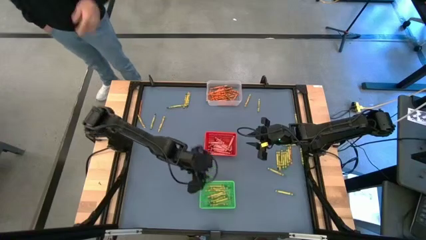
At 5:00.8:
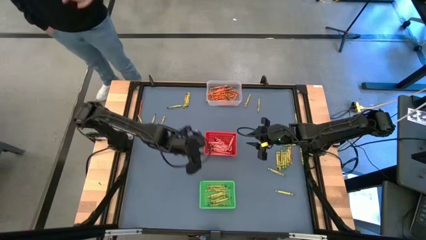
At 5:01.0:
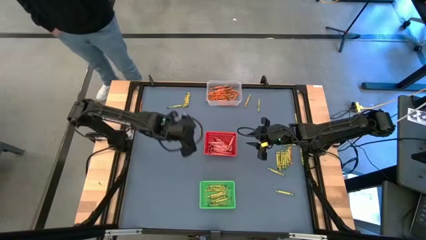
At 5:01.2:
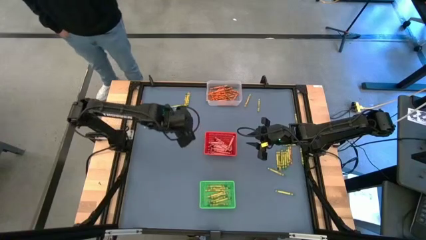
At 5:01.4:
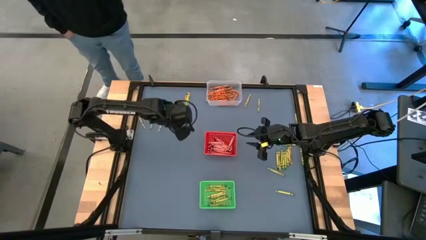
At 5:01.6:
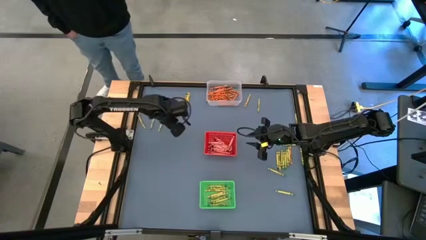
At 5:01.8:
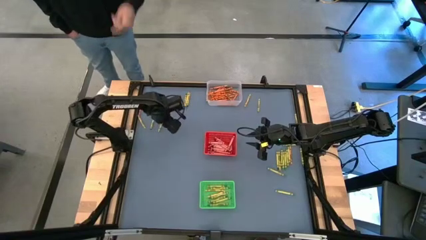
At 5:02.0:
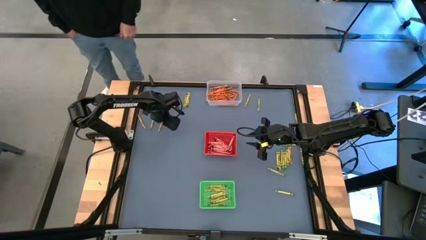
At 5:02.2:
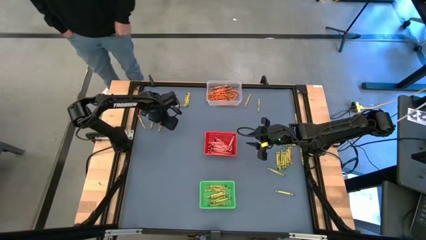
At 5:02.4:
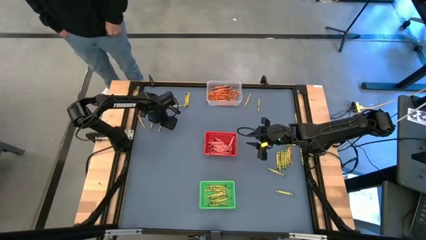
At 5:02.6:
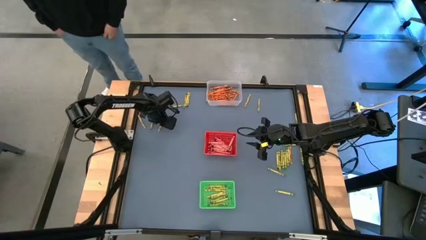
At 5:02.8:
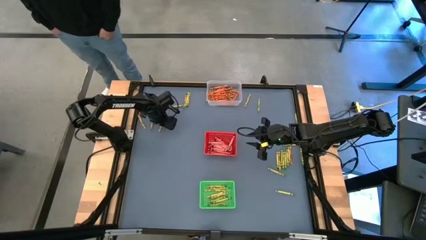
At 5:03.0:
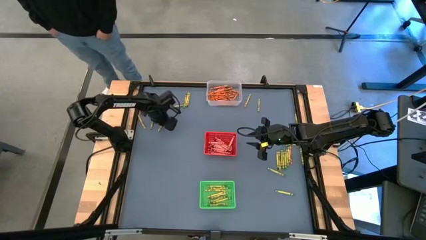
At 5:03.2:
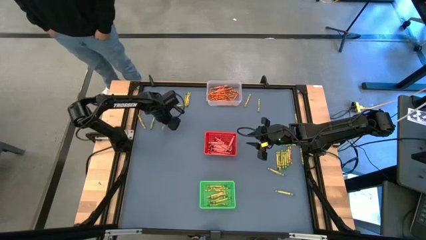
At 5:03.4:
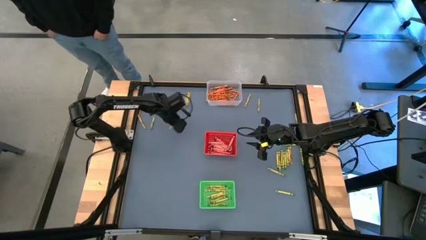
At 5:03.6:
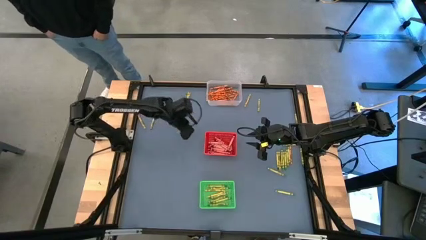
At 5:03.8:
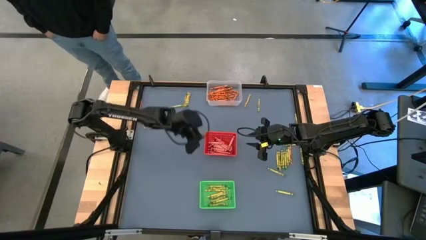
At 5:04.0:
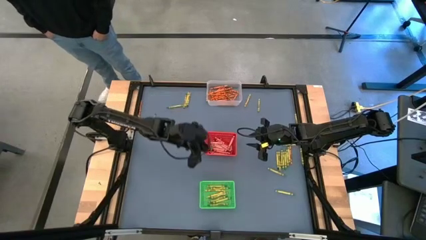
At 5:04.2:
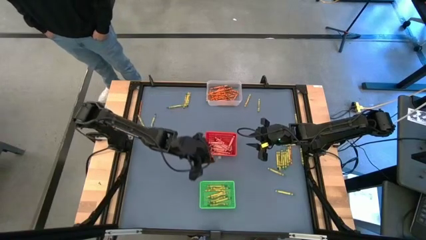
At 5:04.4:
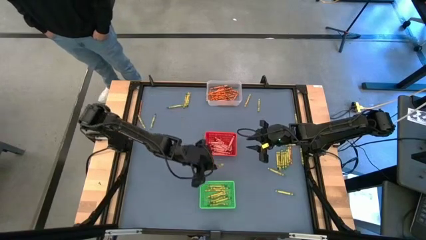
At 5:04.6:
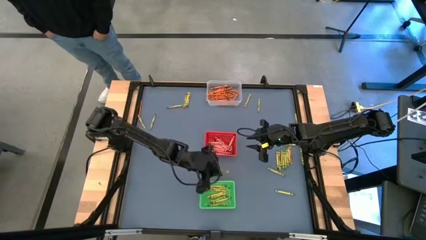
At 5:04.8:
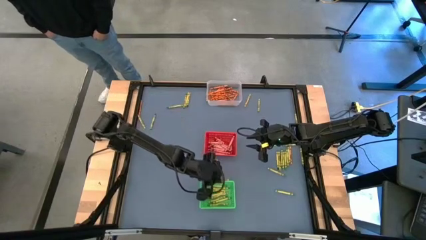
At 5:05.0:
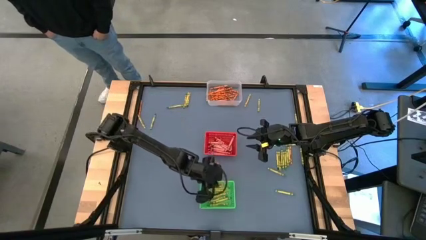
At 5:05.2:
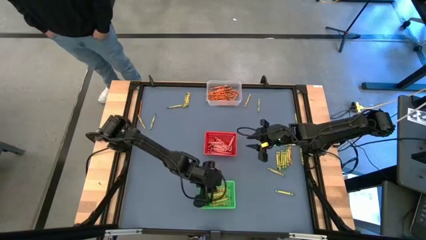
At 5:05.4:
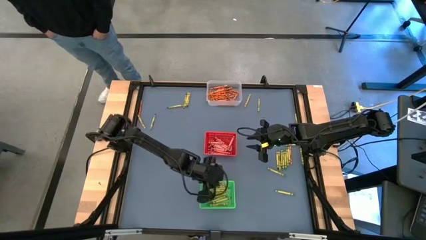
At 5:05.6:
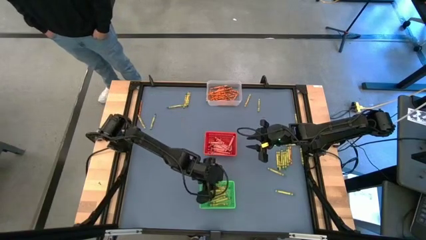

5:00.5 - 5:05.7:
Task: Sort crayons
Put the yellow crayon into the green bin

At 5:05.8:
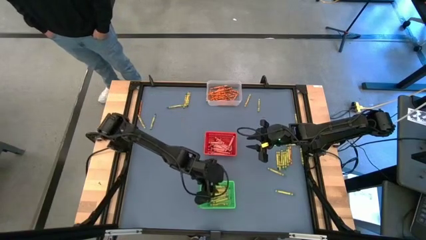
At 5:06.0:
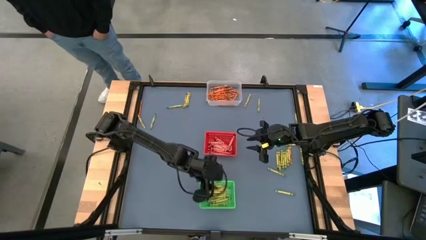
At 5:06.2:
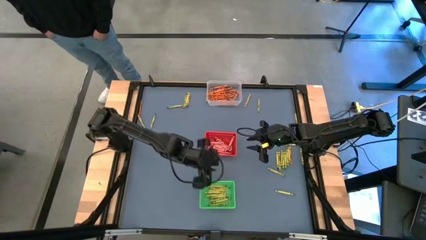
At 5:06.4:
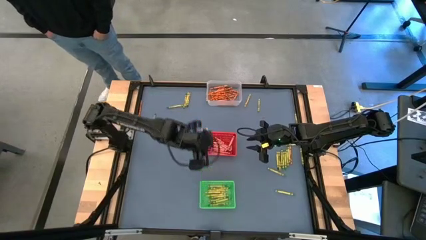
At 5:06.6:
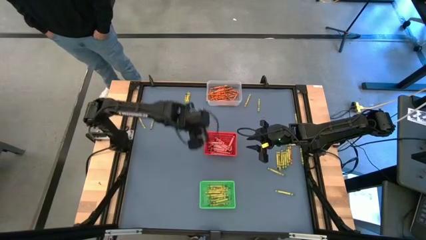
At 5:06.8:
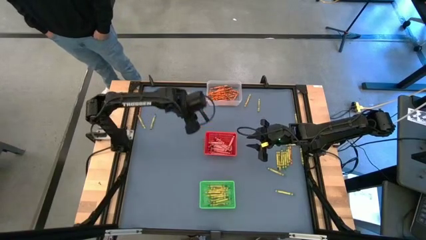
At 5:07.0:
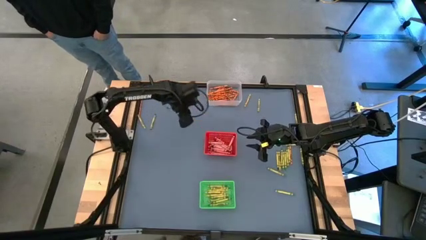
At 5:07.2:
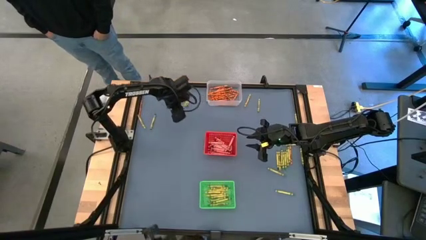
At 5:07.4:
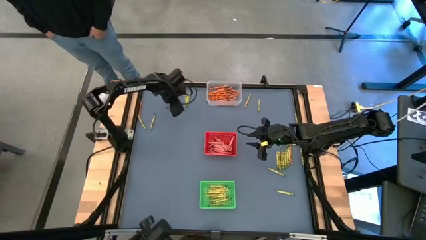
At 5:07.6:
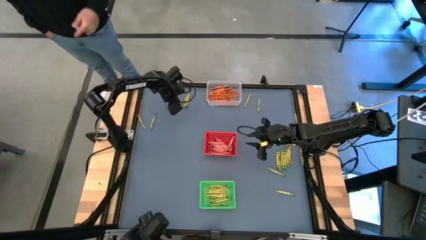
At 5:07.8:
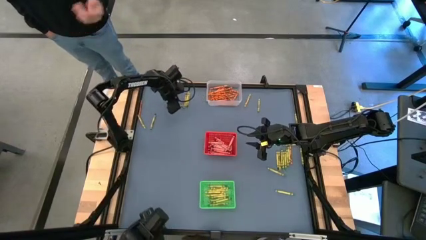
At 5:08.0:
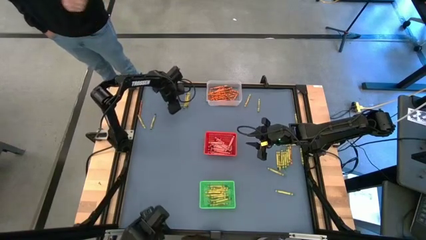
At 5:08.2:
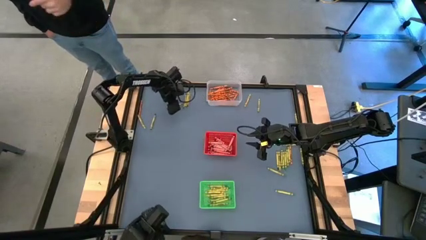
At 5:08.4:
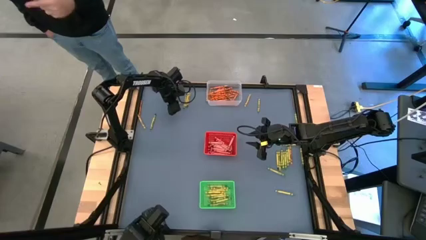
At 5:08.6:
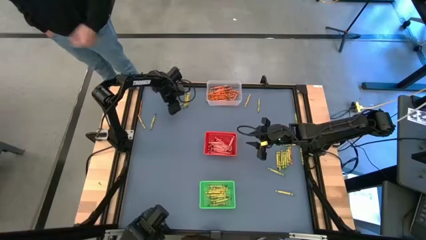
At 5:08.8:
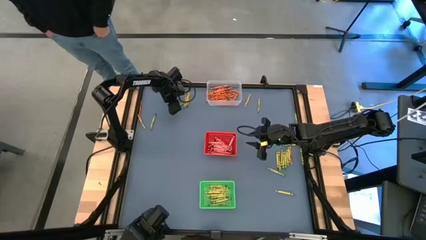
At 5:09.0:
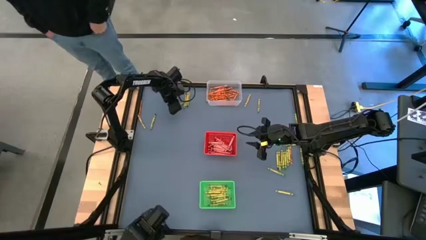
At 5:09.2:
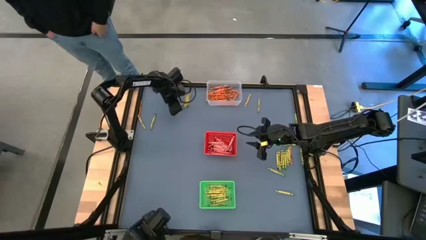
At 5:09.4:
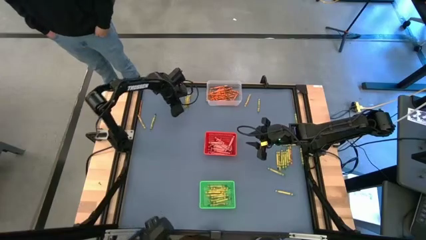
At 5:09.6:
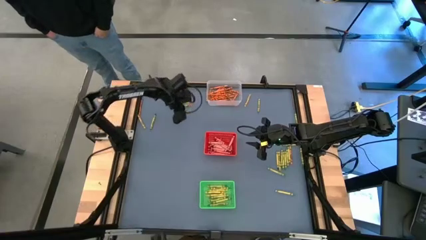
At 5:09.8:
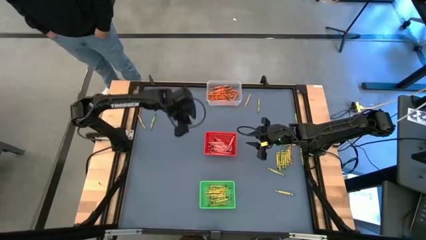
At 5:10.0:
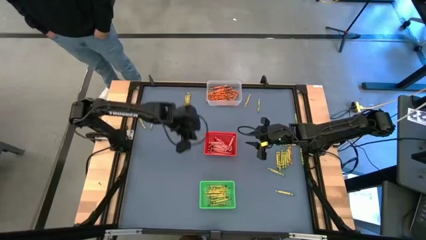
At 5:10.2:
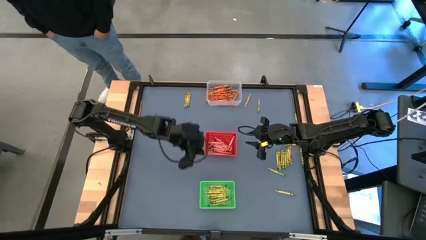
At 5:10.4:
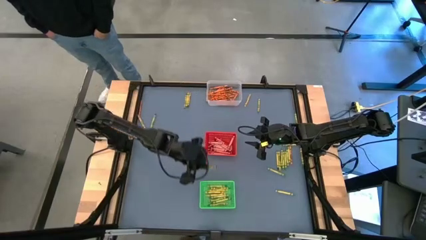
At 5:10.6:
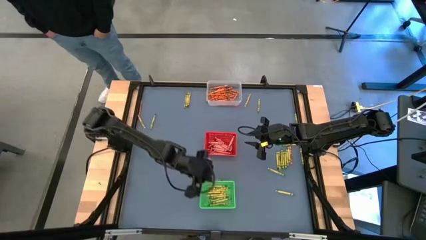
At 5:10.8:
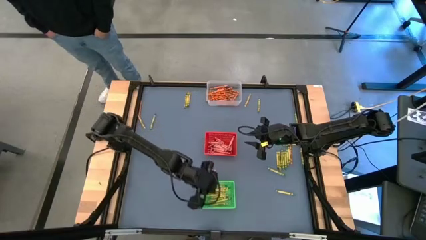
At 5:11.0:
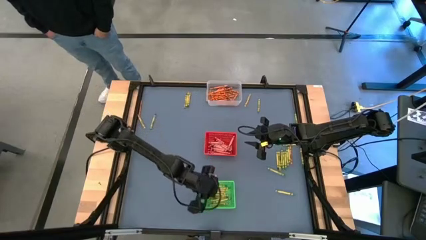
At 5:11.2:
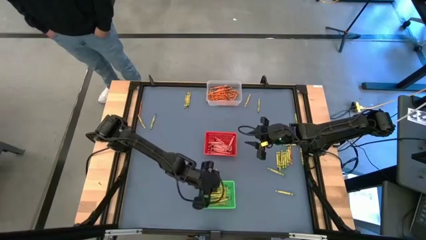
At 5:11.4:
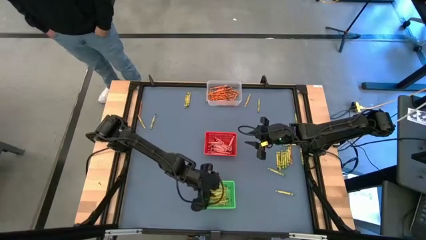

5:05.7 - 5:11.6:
Put the green crayon into the green bin

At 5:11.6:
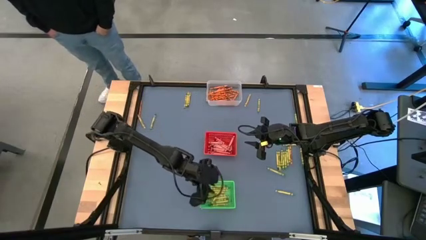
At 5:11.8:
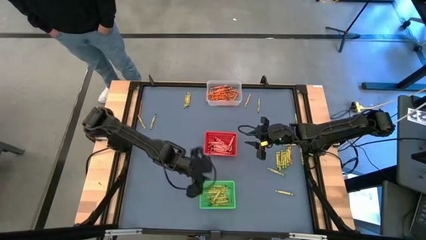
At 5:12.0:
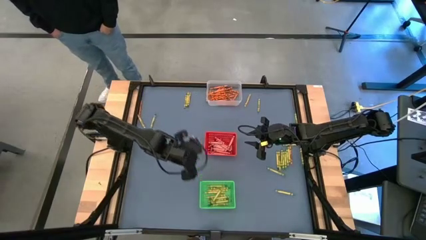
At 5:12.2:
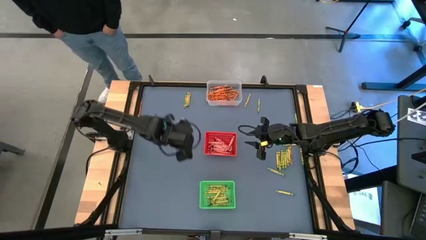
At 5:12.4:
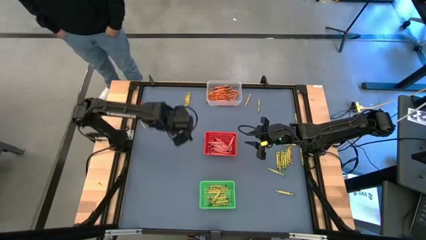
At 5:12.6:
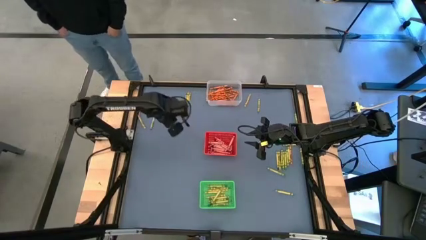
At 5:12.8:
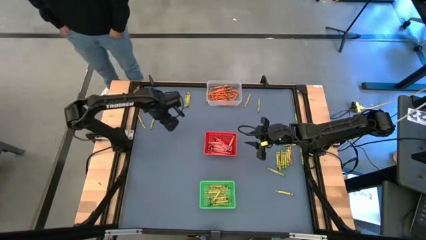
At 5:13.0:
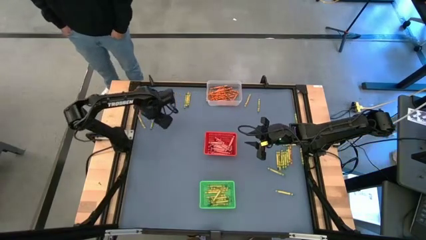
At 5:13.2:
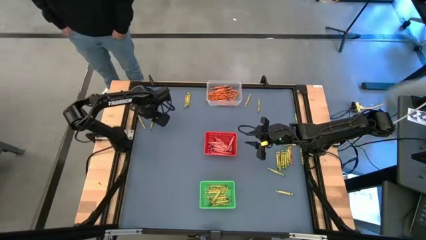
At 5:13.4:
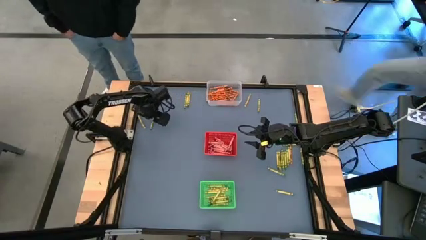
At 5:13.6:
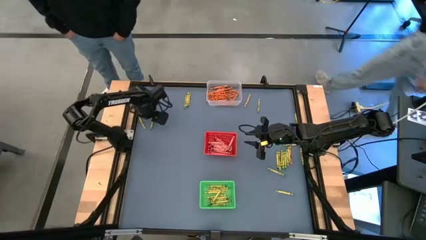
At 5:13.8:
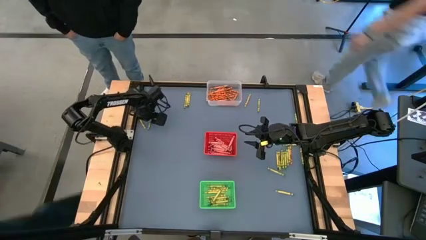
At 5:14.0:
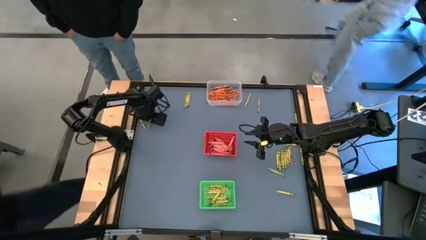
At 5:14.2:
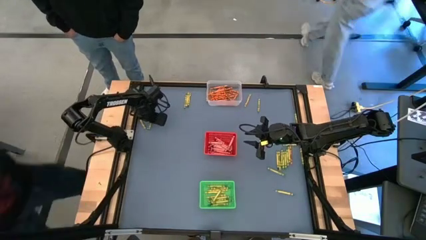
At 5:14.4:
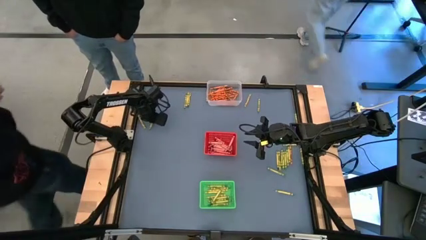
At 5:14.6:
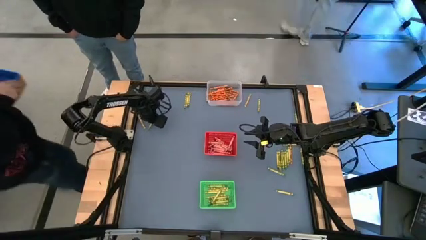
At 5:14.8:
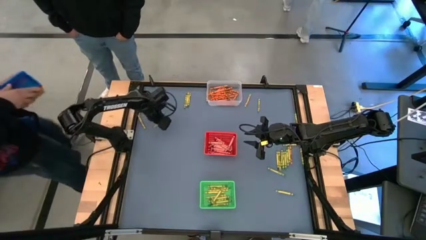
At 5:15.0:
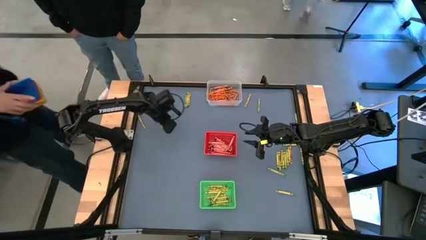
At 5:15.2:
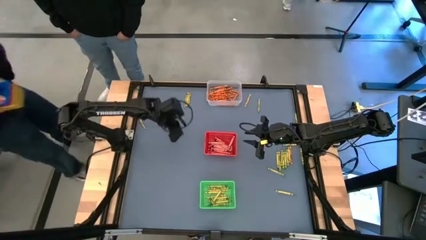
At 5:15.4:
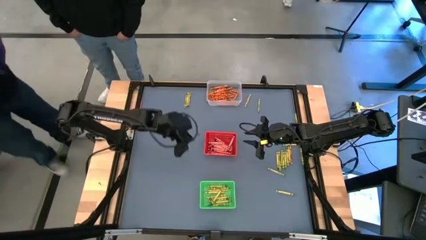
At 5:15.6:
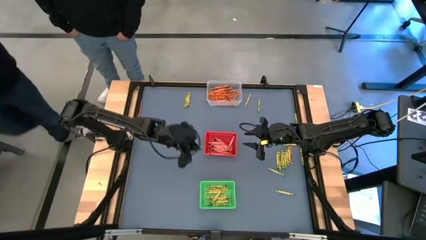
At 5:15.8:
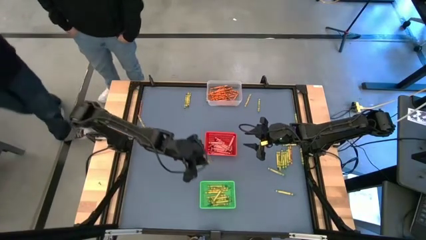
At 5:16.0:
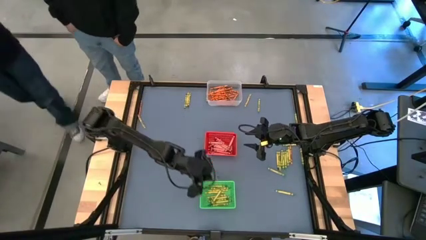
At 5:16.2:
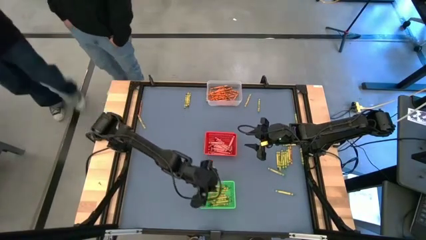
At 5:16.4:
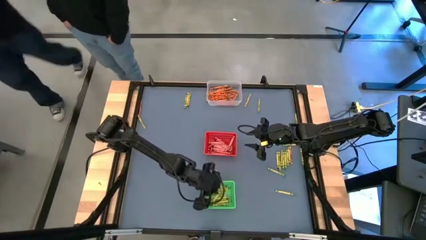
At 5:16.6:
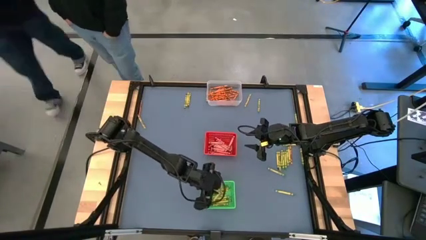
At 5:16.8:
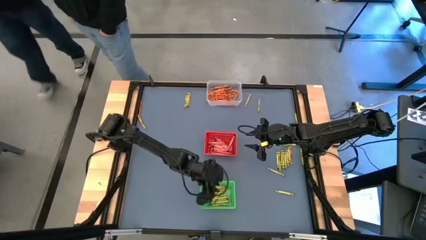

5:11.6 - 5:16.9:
Put the green crayon into the green bin
